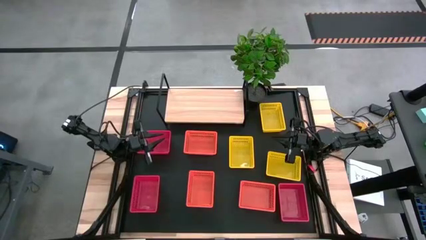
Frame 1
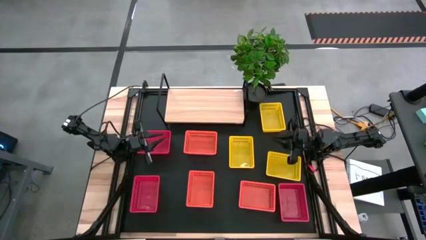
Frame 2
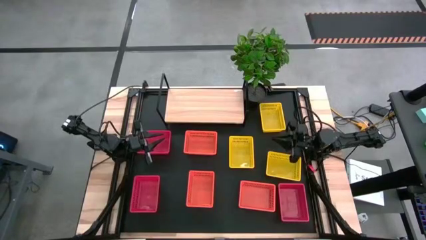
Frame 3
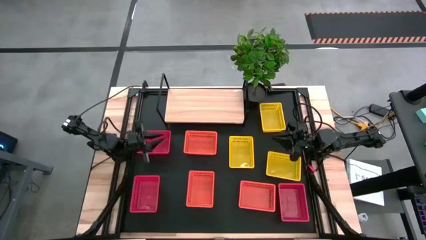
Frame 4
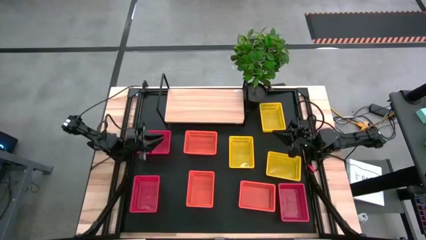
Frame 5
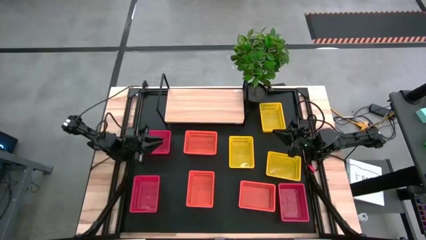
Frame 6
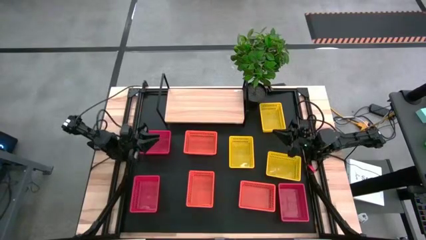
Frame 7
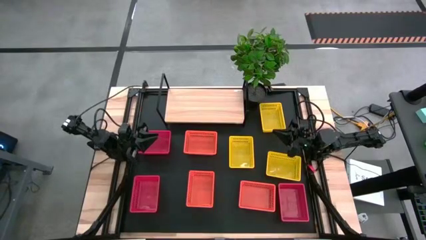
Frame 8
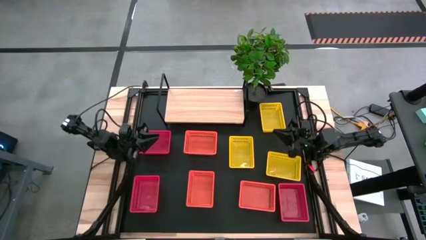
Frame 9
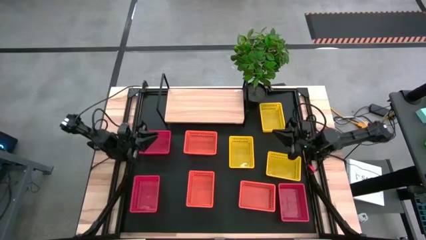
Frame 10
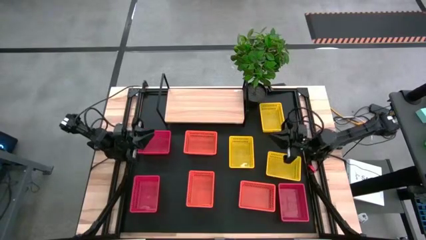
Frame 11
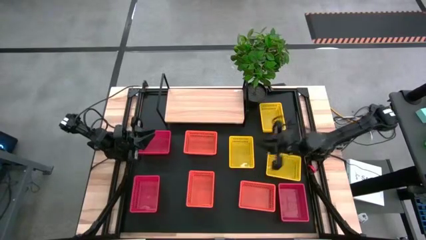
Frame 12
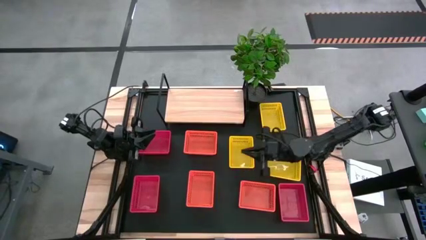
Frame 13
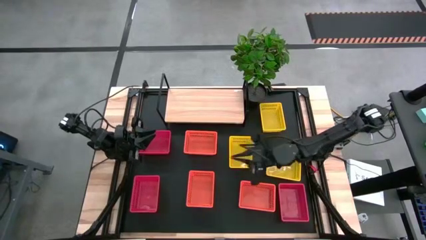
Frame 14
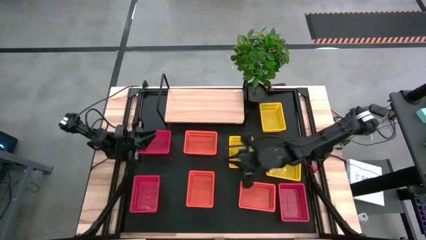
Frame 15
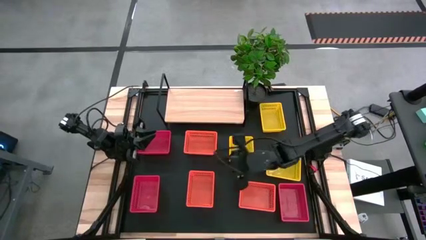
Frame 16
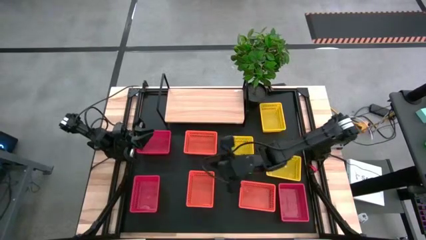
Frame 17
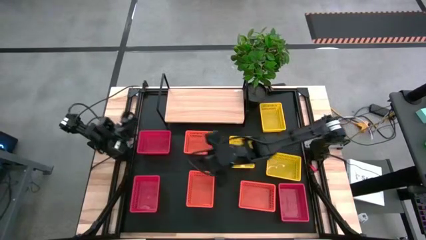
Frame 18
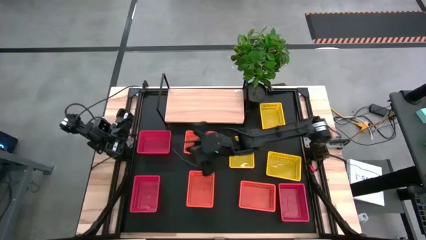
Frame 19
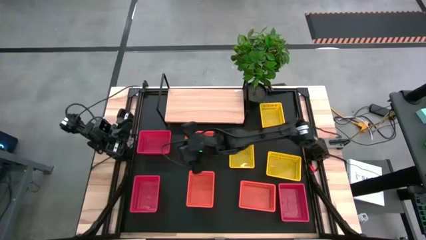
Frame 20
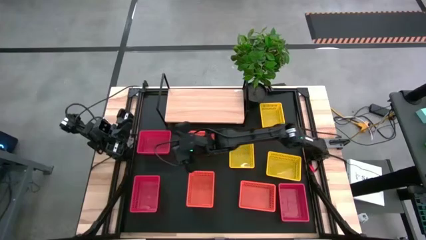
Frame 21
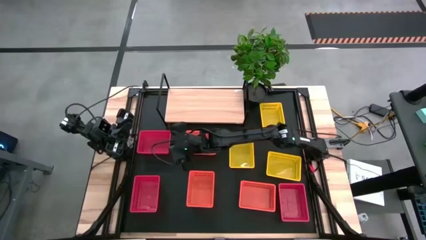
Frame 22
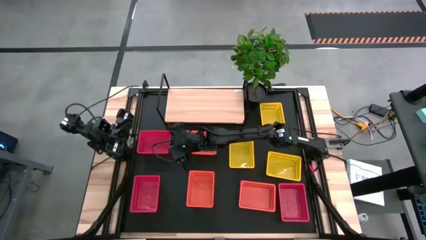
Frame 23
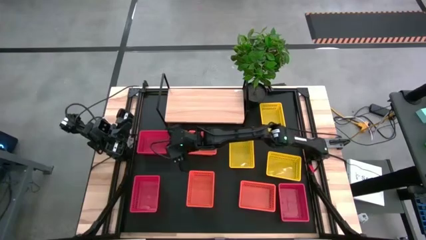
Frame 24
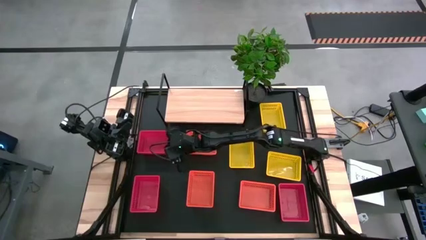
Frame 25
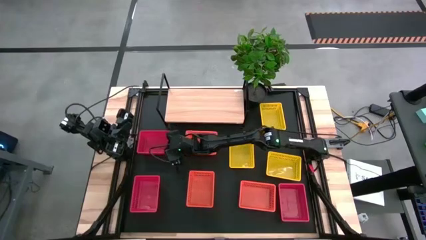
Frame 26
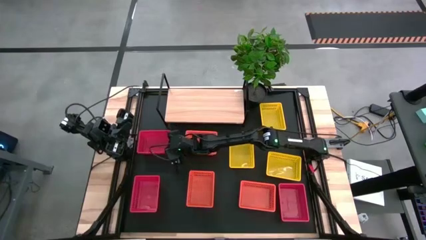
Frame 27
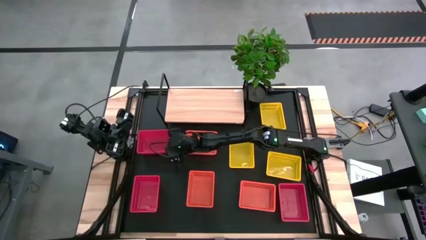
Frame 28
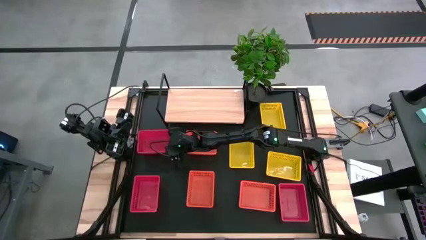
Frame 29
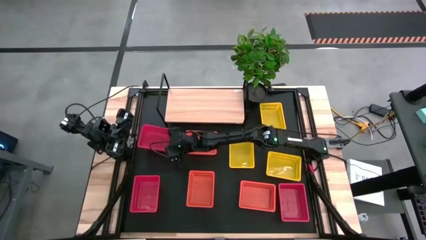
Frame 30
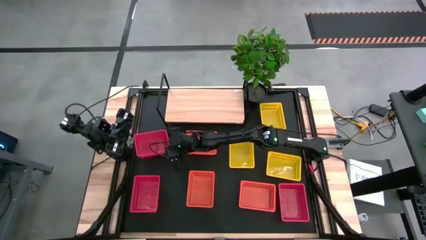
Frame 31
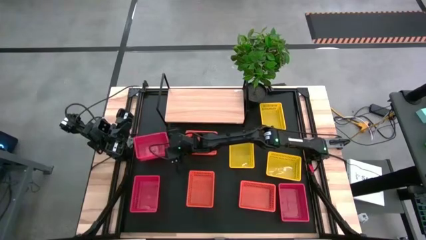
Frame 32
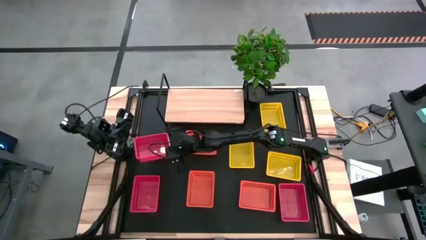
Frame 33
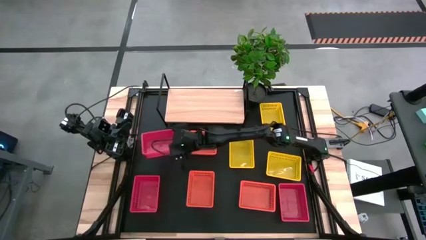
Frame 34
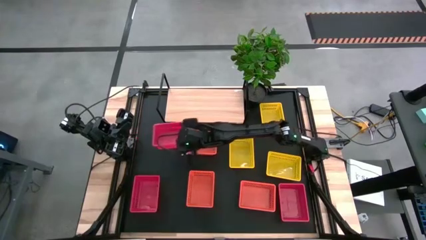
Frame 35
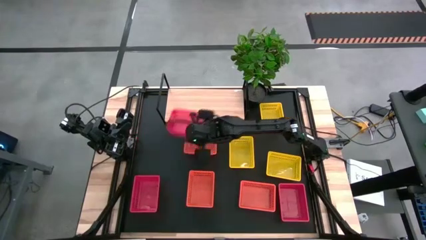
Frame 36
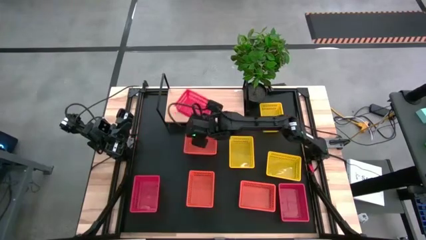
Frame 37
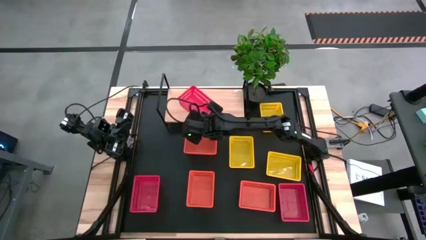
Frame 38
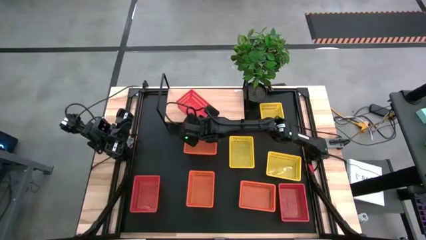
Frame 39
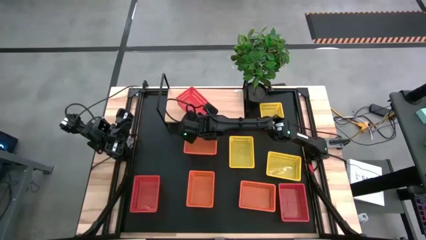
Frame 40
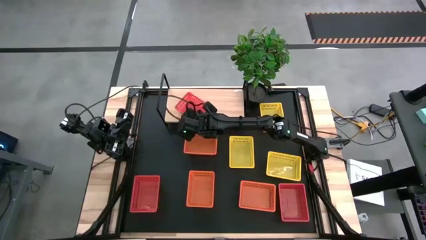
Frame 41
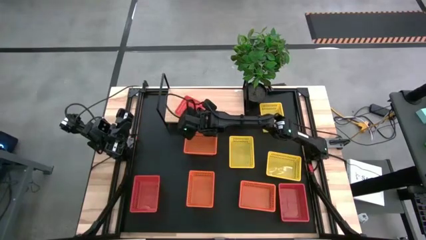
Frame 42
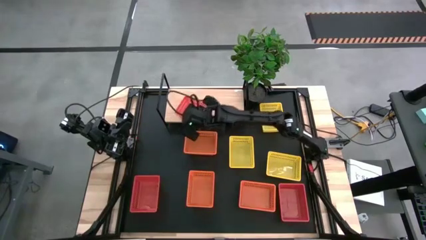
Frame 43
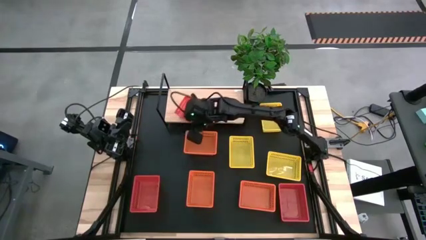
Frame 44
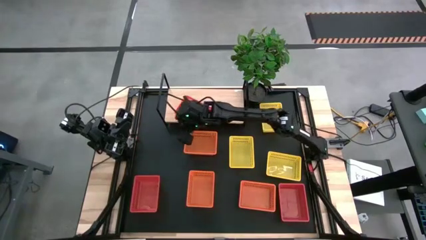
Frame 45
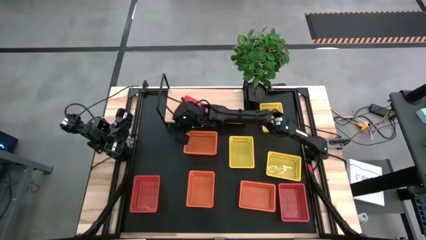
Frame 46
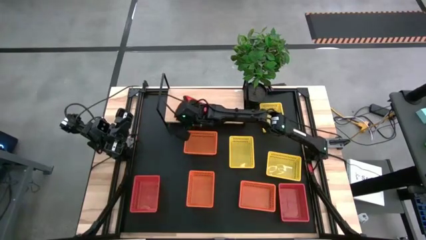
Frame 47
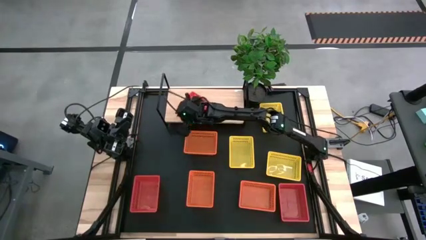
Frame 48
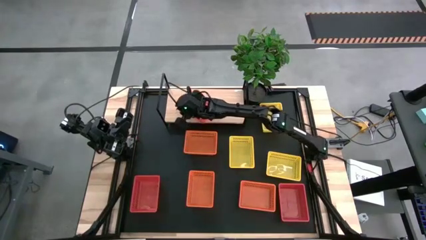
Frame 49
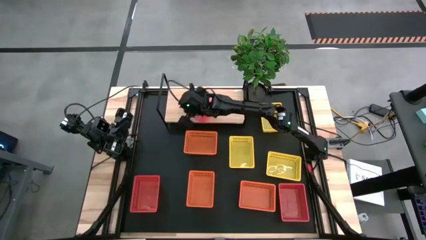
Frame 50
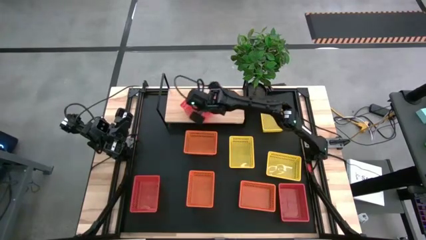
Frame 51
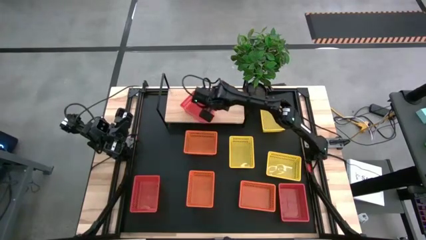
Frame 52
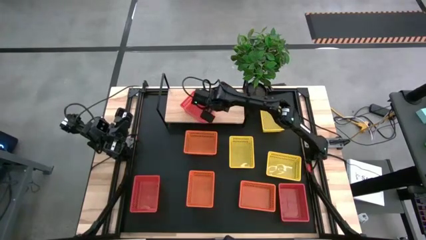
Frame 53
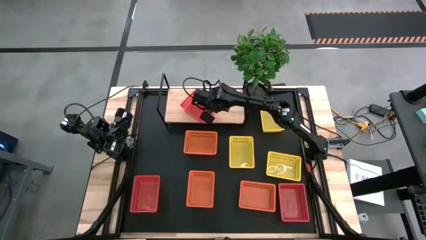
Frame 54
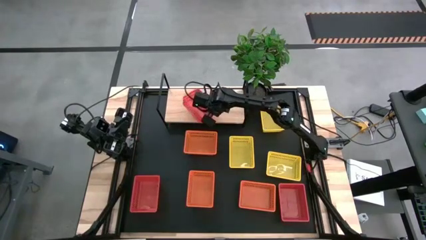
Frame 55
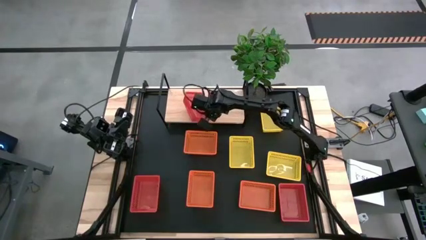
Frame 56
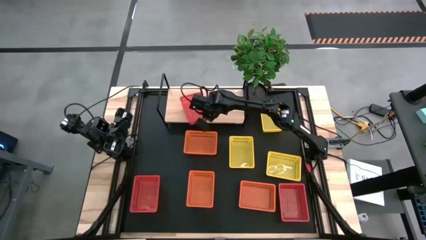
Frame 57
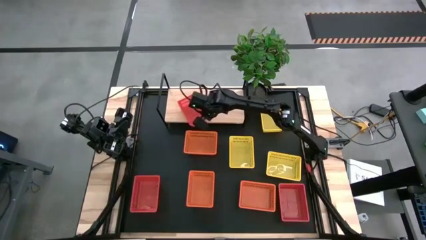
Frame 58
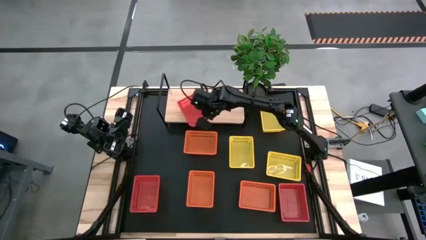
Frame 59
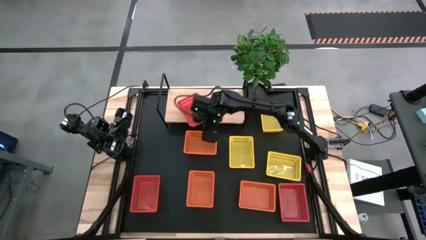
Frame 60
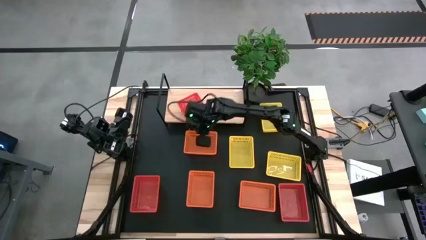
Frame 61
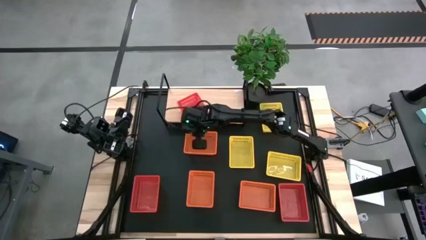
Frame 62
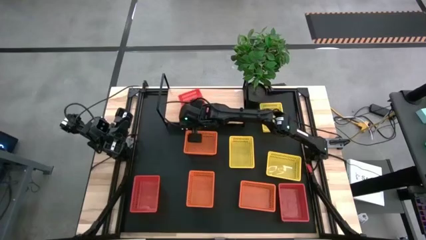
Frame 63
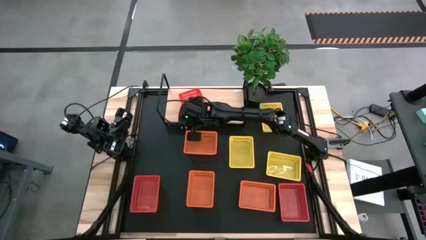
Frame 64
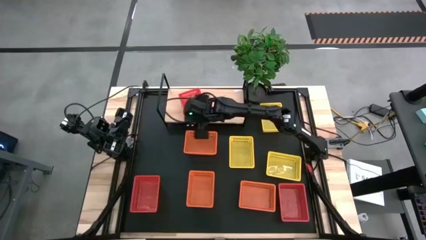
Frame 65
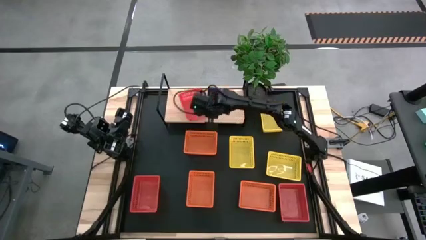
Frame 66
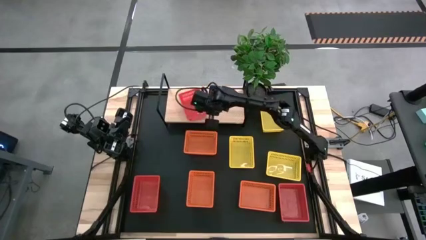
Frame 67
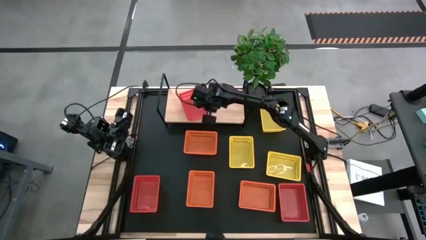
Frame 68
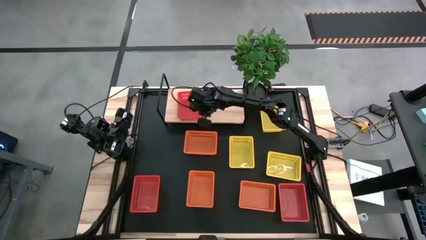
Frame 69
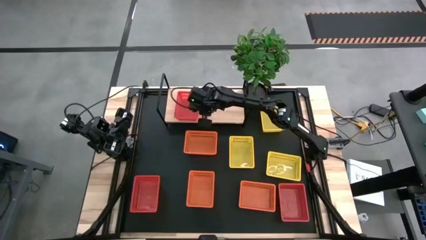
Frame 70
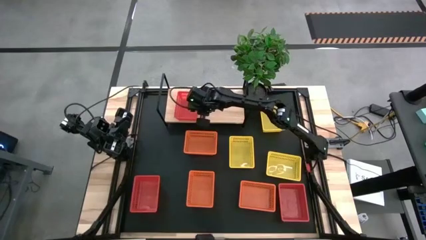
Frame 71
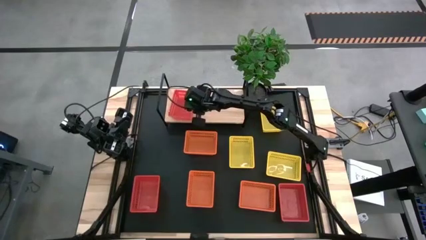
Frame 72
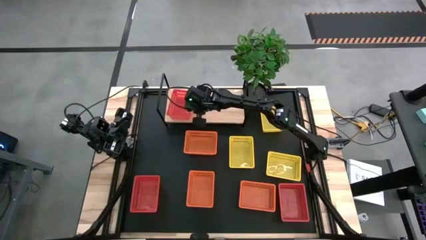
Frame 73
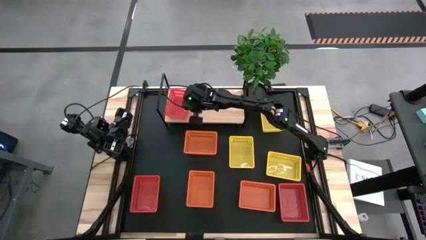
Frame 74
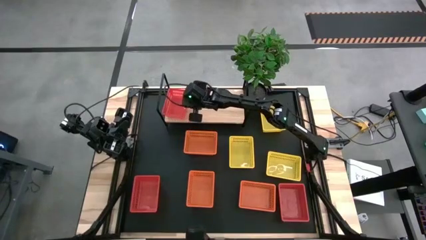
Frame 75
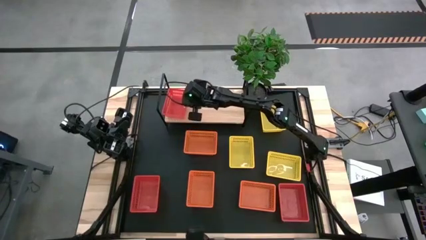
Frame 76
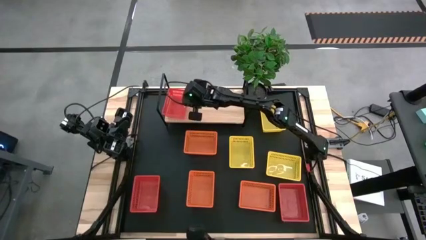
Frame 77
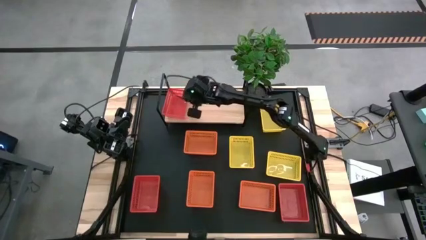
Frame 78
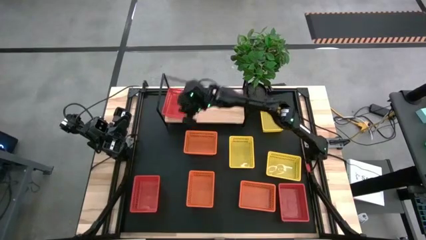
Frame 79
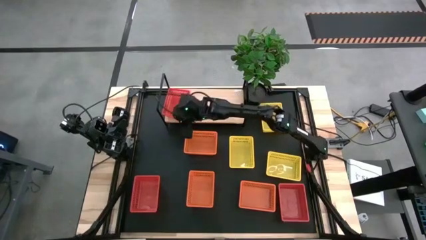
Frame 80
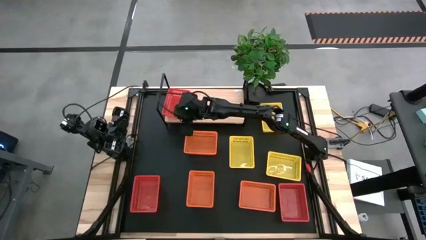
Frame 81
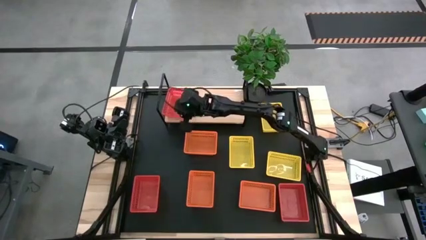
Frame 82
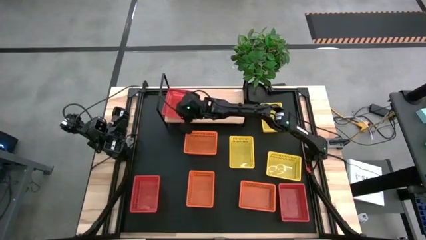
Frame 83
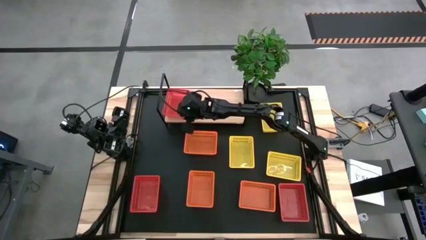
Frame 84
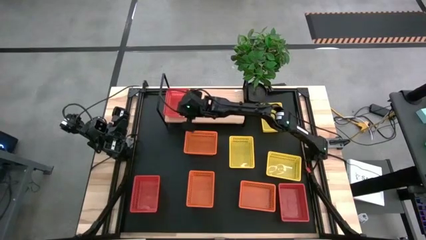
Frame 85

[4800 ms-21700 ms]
Task: Stack baskets on shelf by color
Put the top red bin on the shelf
